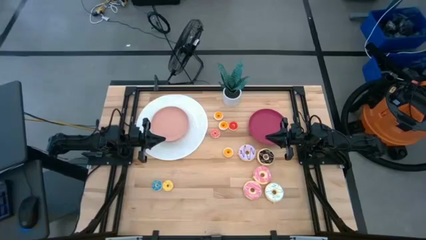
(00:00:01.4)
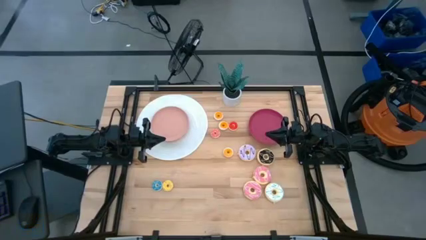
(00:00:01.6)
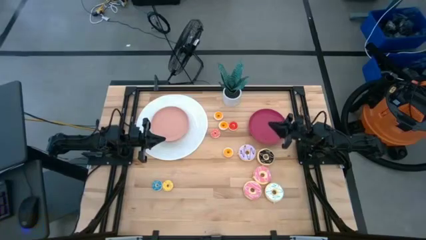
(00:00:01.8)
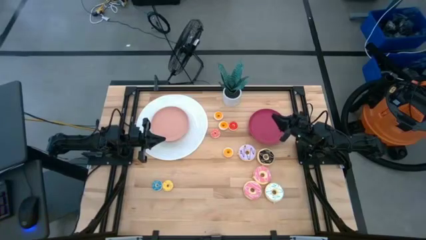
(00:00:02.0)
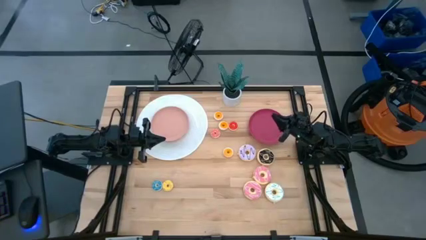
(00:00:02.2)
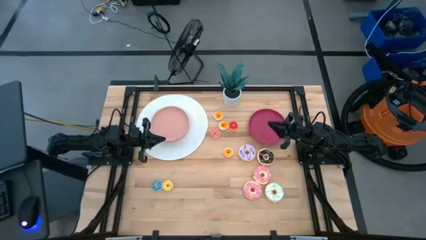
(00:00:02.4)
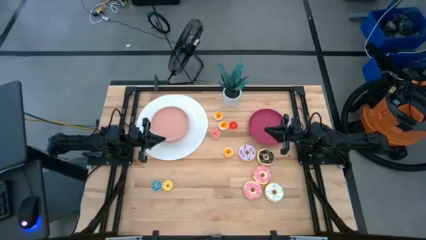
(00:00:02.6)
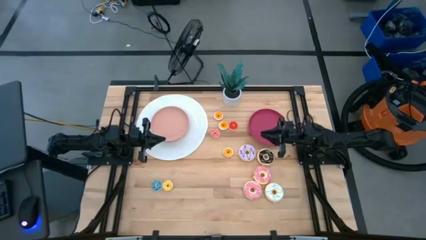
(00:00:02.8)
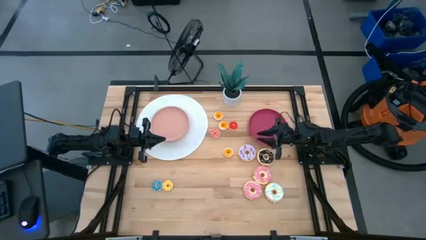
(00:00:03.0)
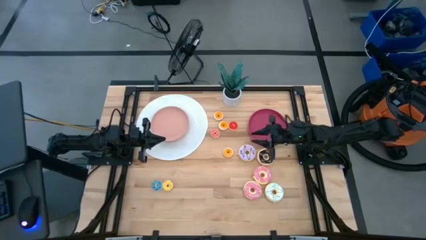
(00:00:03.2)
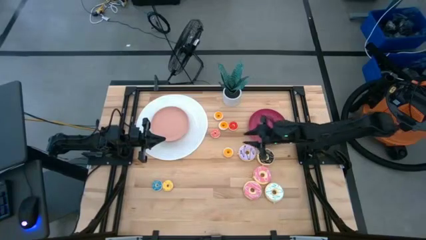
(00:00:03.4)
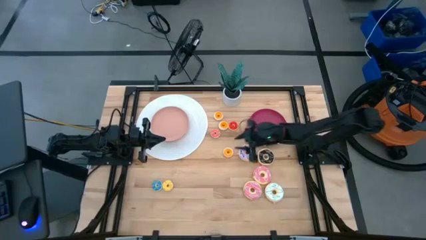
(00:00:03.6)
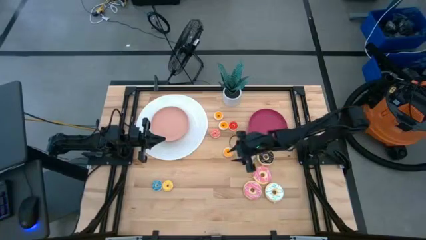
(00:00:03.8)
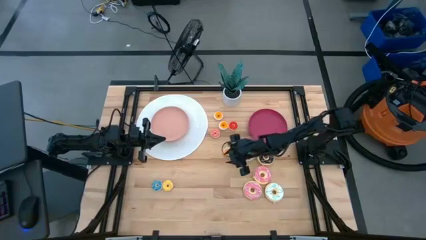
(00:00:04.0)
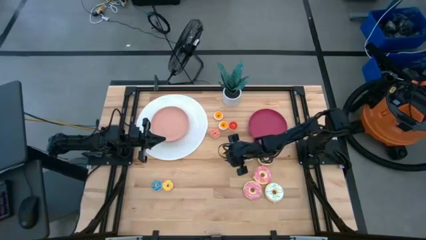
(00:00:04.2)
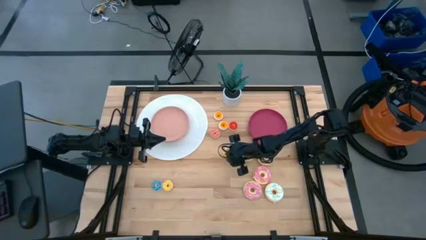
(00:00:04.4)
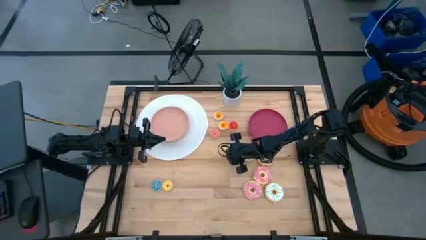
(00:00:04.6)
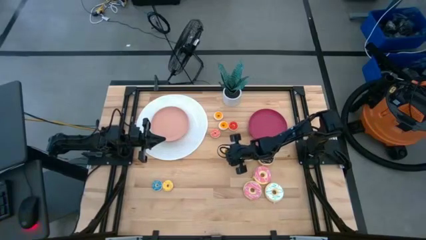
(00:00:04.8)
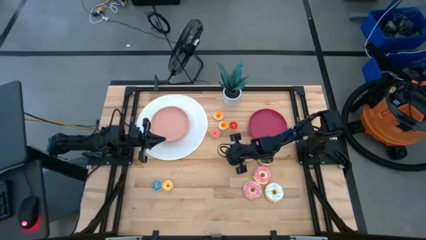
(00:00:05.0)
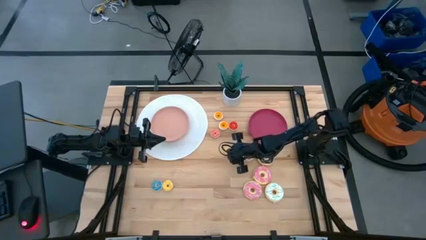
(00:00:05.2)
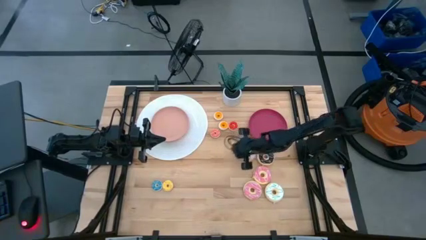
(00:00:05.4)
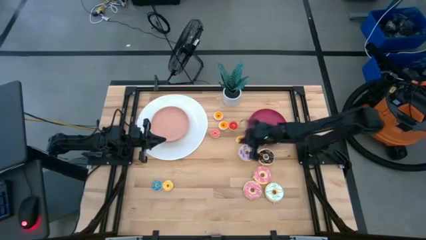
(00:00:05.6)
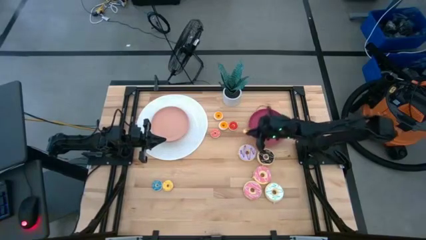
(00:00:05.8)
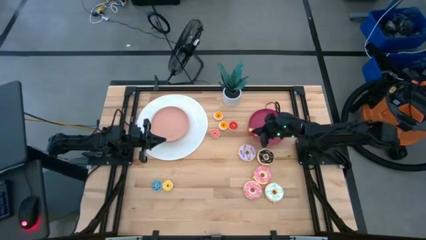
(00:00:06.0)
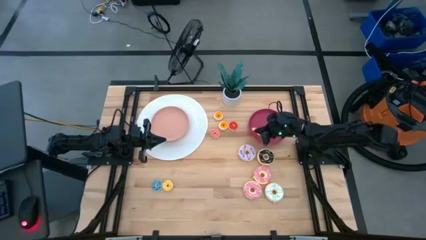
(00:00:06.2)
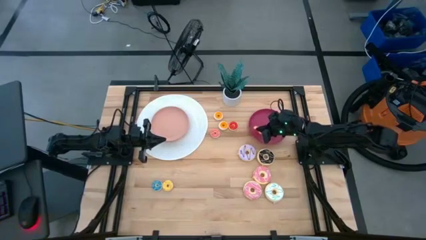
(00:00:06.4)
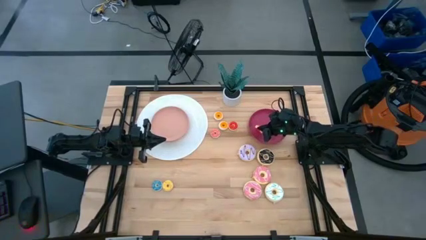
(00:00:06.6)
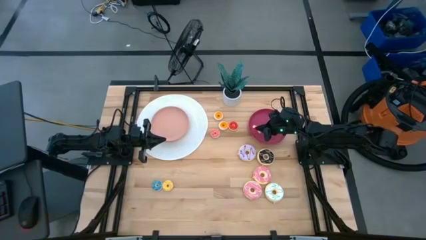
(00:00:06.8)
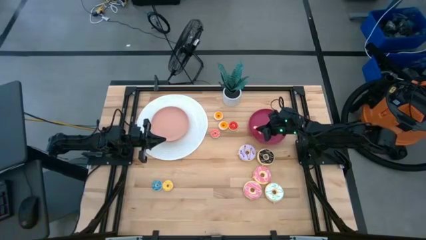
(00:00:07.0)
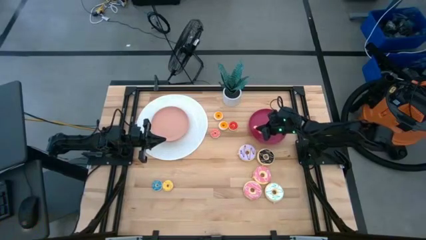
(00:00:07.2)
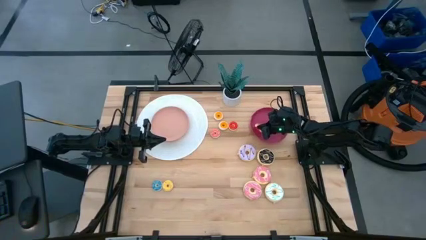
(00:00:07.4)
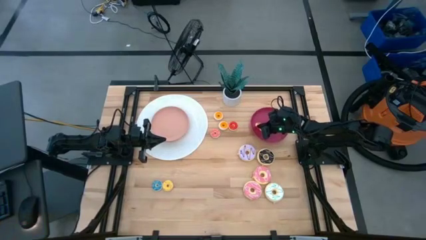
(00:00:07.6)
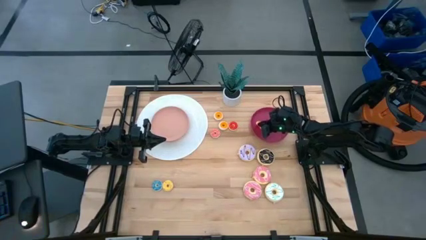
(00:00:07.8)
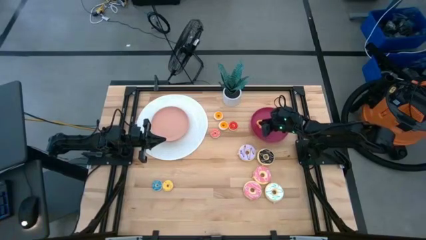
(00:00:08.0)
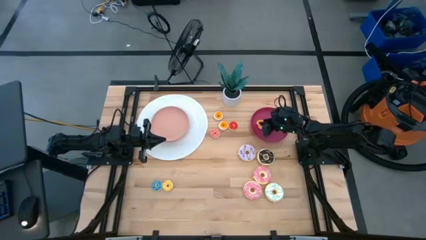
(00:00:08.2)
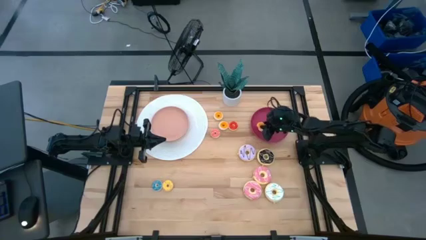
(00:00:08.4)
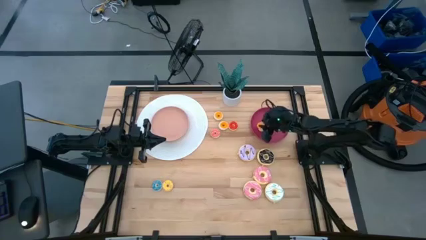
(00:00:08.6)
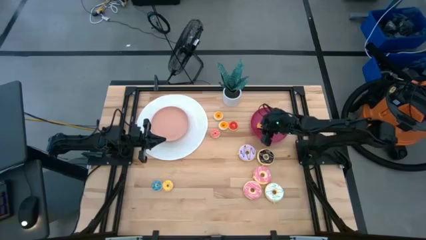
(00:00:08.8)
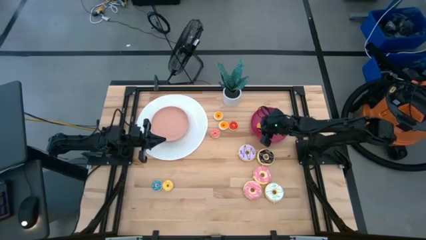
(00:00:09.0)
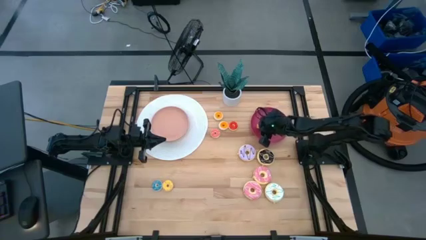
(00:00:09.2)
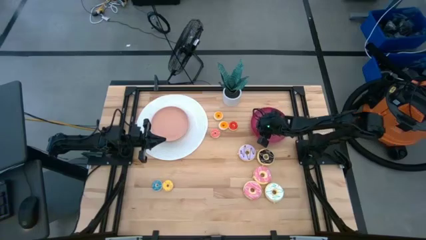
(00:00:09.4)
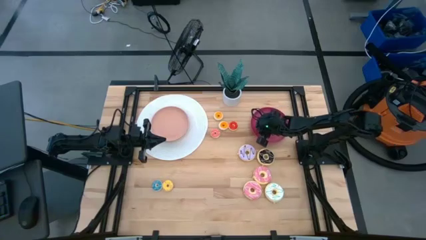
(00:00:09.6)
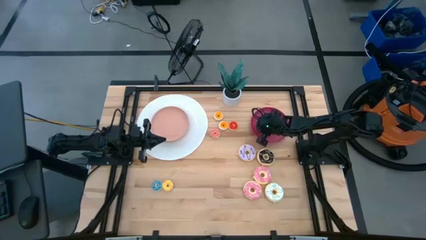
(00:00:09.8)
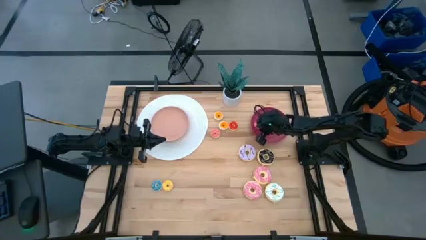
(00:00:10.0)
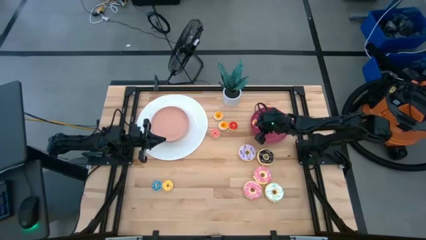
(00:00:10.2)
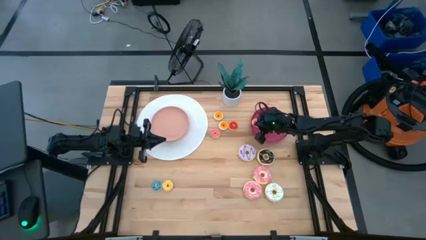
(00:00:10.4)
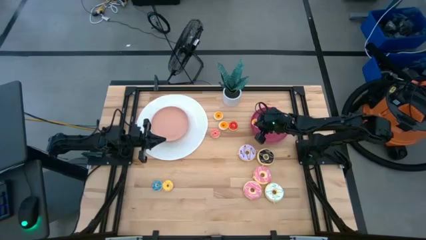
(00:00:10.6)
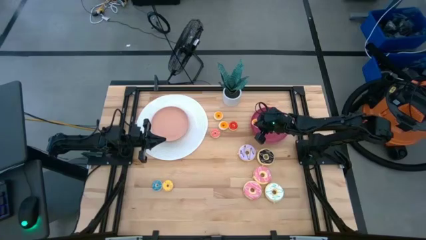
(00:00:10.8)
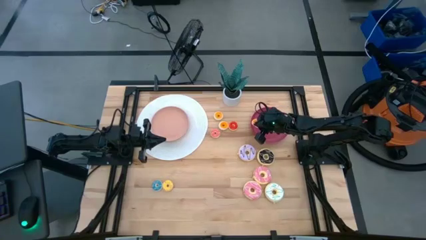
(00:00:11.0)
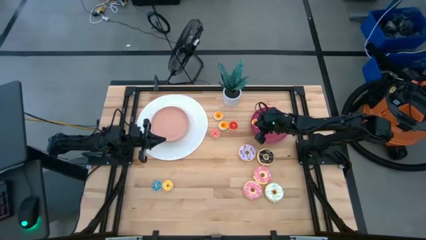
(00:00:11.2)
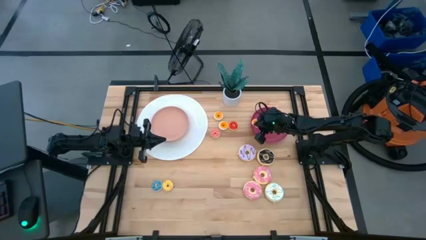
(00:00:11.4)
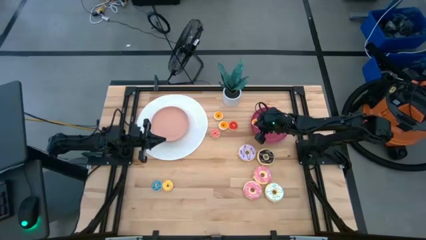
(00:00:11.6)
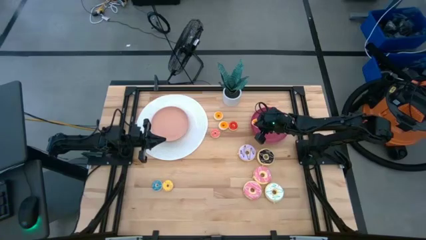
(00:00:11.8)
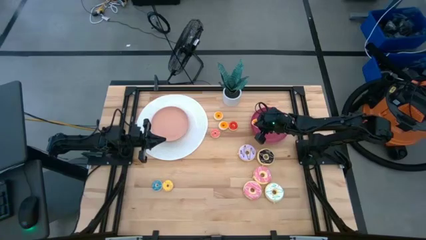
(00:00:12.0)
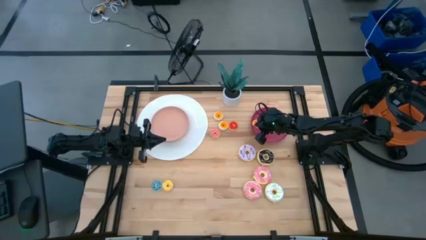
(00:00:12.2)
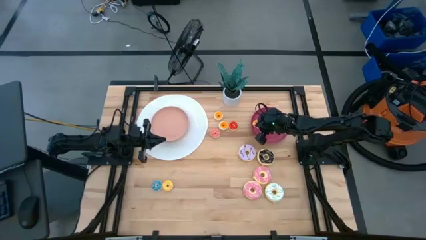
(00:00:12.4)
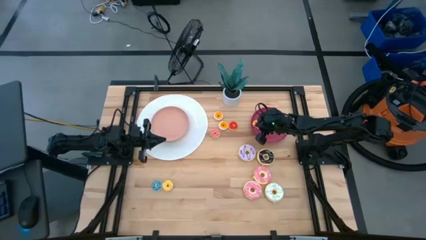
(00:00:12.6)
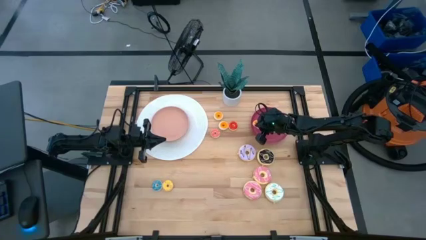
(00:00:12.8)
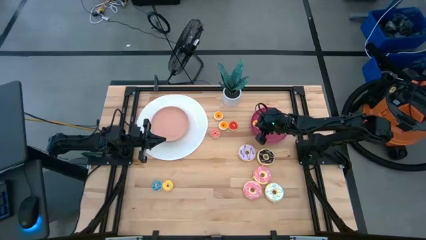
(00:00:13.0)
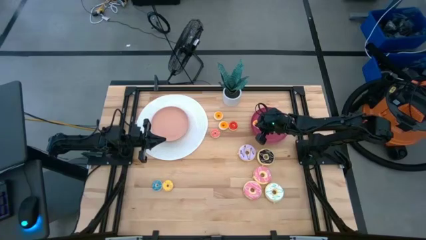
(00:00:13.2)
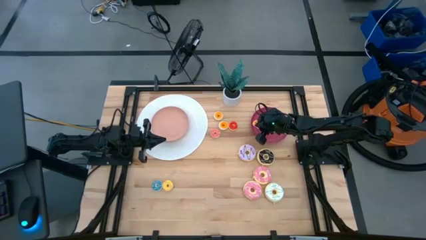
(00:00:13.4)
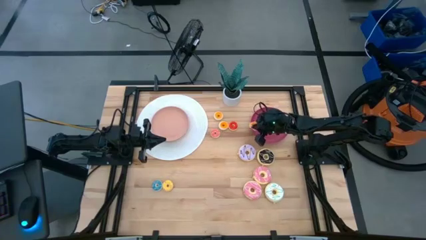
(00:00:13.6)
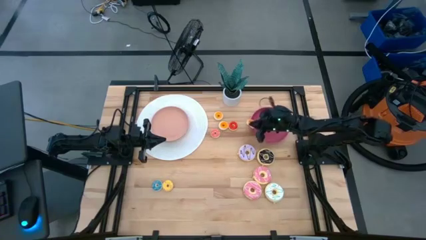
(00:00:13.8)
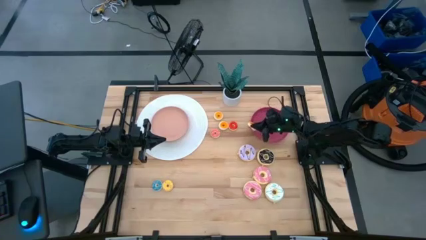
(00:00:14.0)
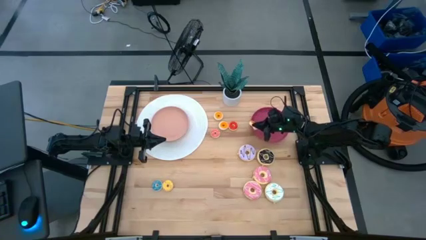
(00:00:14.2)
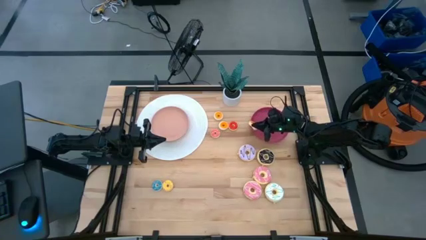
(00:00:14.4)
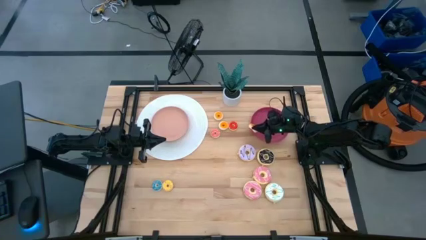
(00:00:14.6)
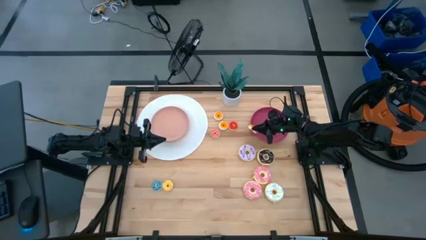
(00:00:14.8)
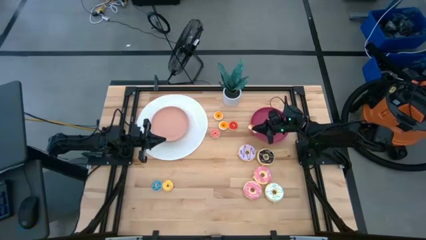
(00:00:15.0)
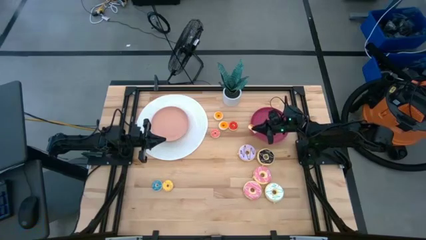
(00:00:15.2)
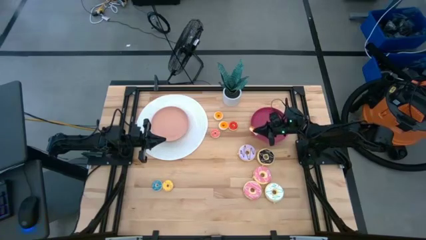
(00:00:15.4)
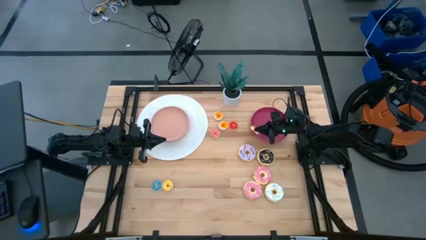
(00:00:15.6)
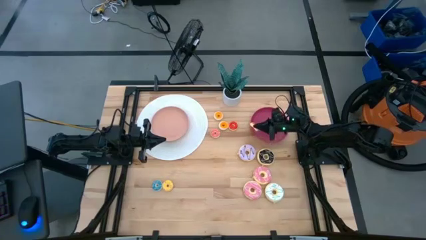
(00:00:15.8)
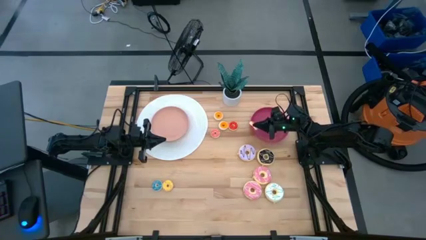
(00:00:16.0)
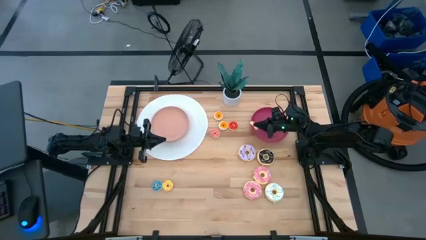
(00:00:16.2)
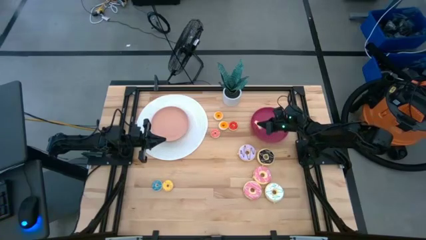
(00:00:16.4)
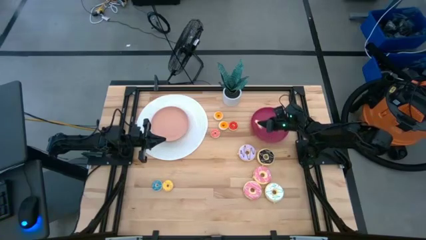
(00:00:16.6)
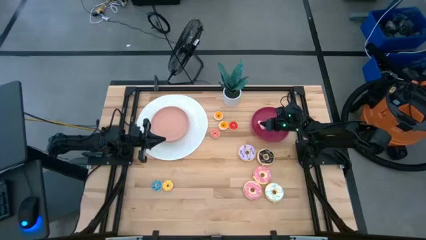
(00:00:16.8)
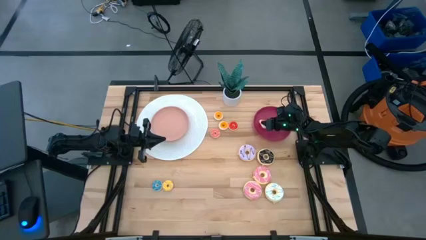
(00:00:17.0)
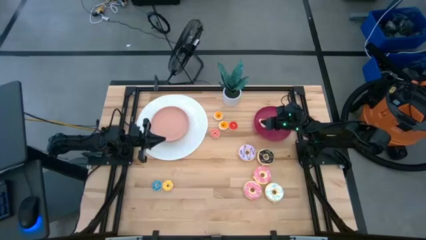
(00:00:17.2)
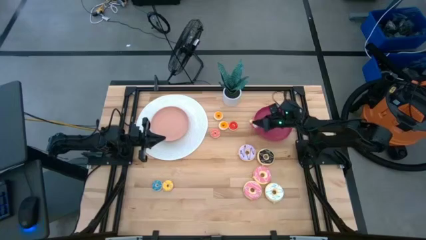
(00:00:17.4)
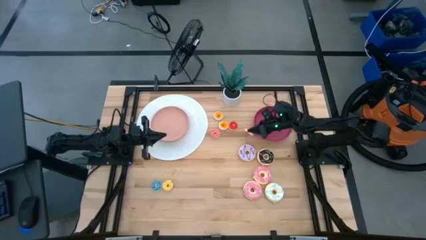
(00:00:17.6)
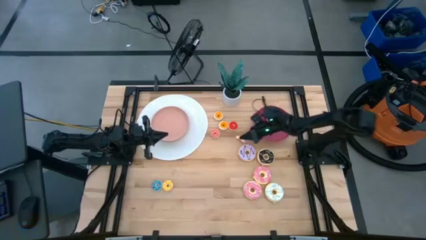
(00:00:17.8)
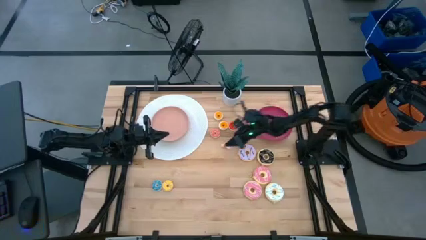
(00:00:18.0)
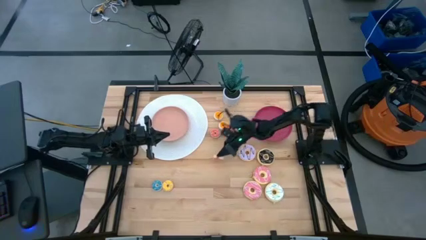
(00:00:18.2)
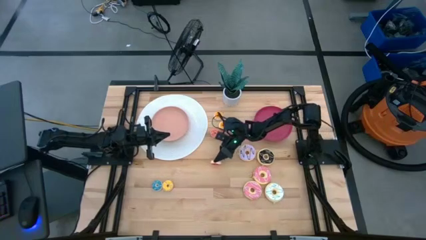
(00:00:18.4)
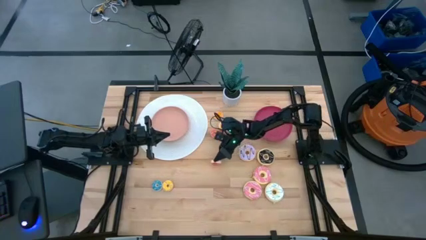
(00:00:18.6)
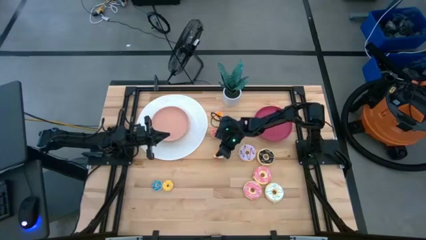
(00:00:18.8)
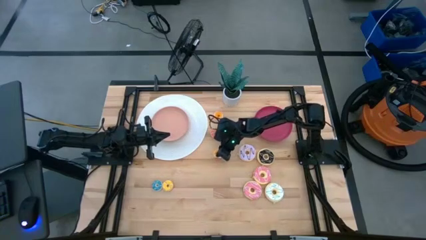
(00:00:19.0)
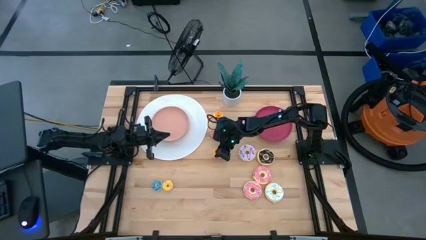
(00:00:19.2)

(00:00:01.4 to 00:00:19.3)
Task: Pick & Place donuts
Put the bottom small red donut on the red plate
